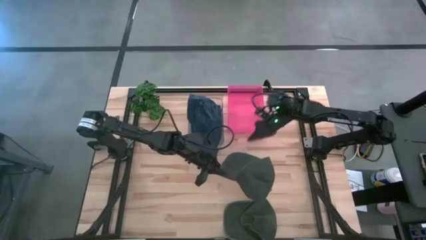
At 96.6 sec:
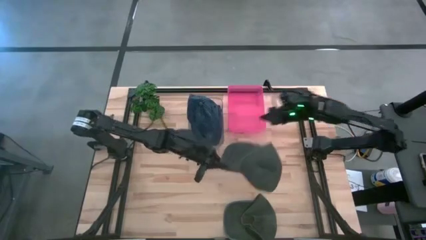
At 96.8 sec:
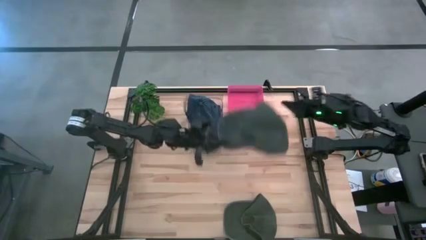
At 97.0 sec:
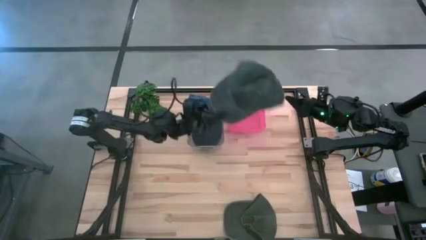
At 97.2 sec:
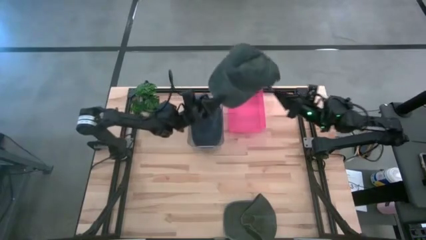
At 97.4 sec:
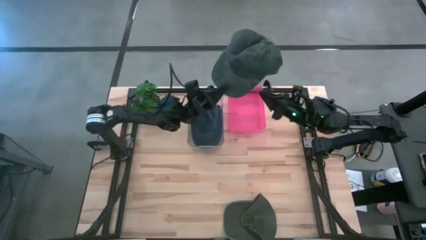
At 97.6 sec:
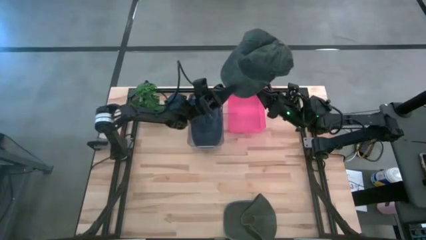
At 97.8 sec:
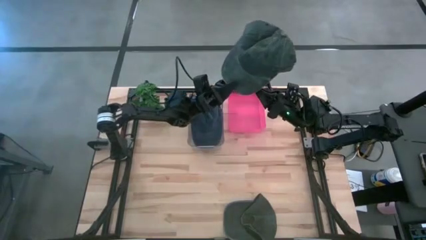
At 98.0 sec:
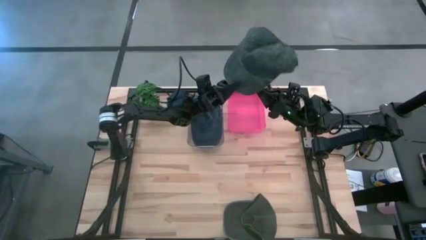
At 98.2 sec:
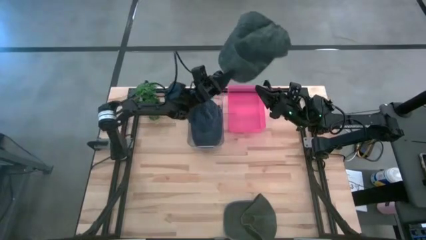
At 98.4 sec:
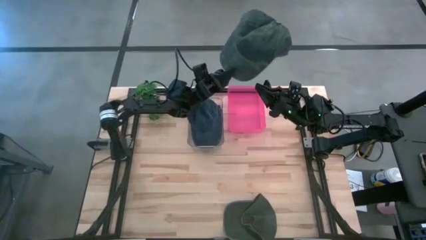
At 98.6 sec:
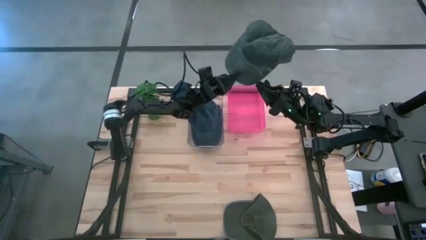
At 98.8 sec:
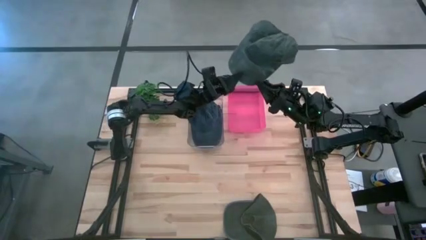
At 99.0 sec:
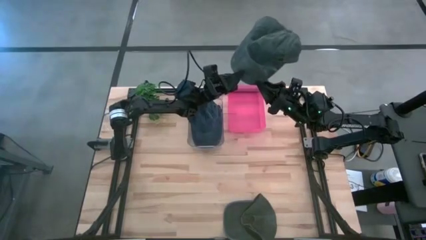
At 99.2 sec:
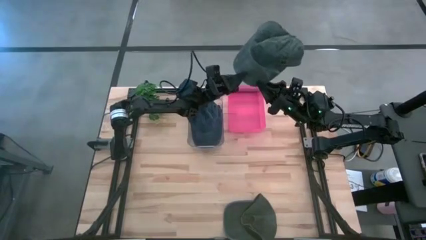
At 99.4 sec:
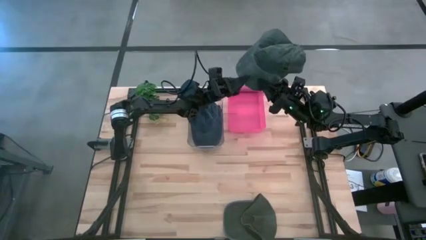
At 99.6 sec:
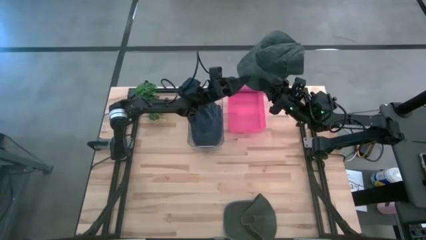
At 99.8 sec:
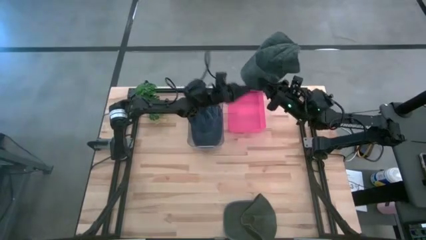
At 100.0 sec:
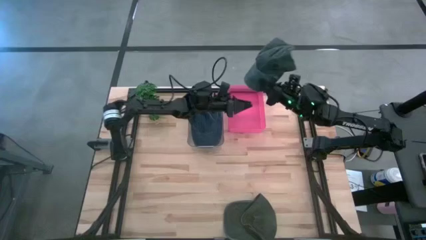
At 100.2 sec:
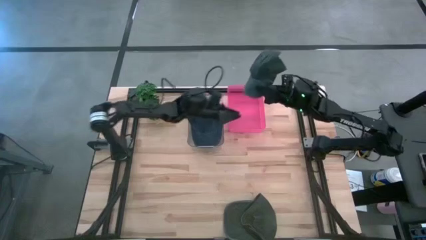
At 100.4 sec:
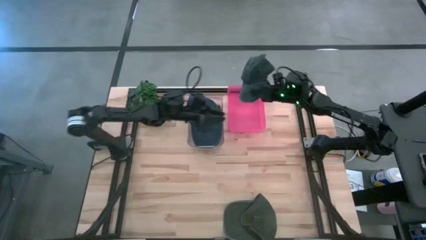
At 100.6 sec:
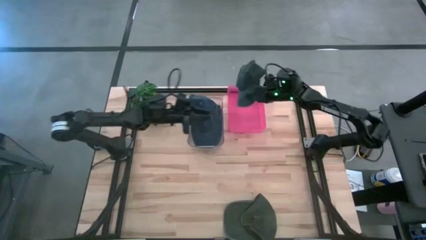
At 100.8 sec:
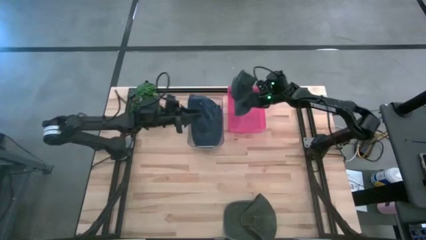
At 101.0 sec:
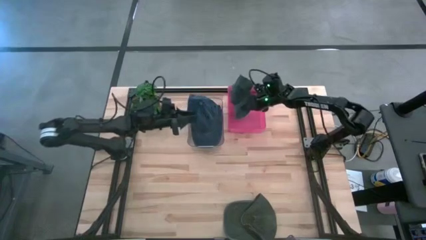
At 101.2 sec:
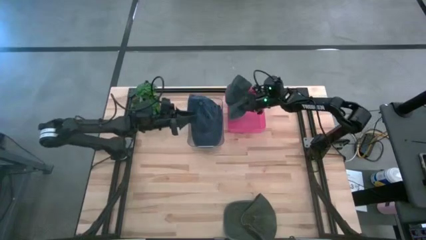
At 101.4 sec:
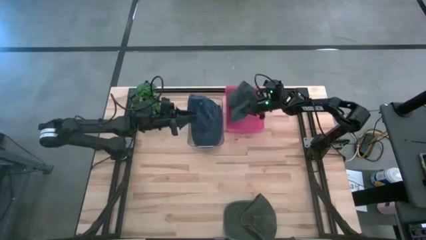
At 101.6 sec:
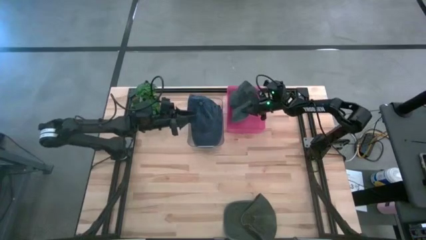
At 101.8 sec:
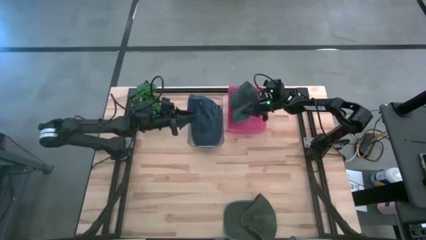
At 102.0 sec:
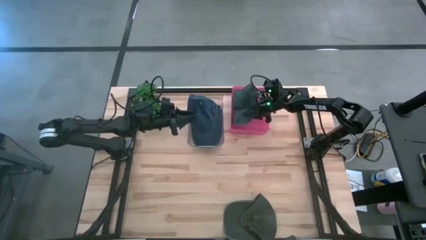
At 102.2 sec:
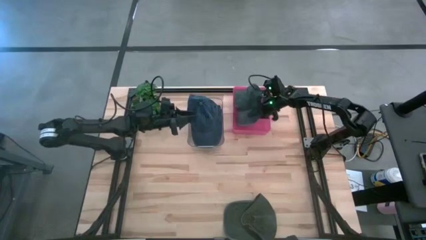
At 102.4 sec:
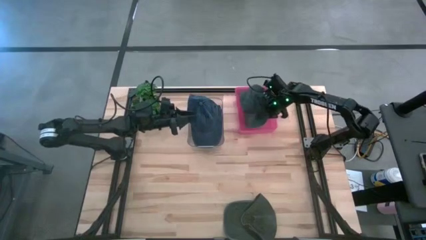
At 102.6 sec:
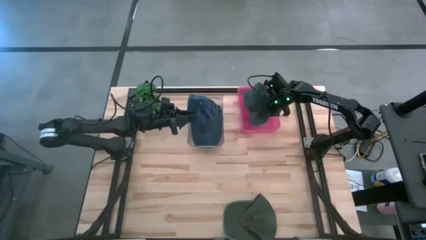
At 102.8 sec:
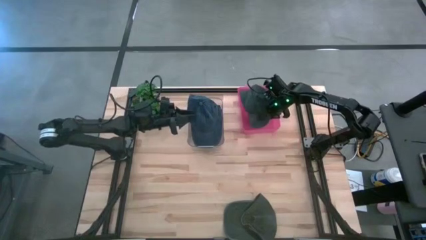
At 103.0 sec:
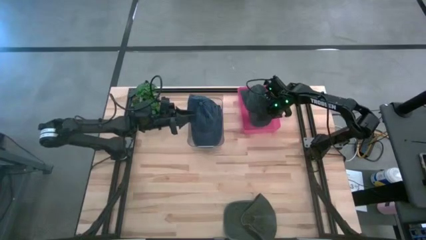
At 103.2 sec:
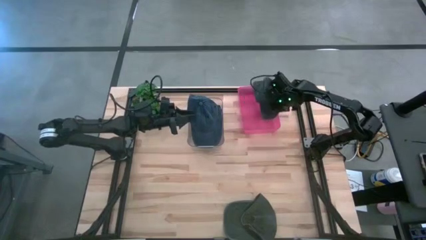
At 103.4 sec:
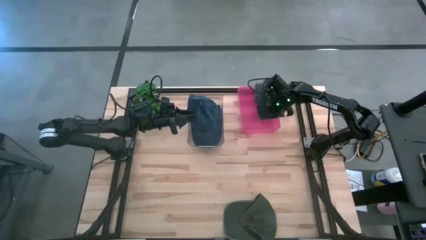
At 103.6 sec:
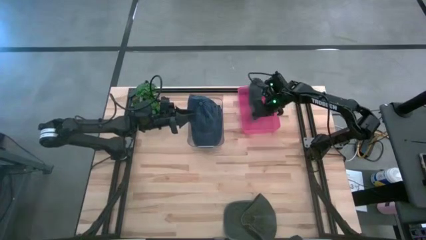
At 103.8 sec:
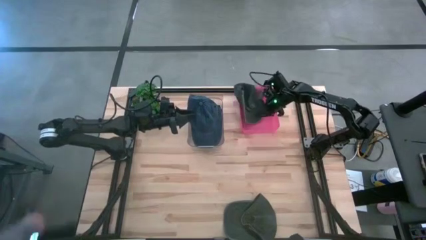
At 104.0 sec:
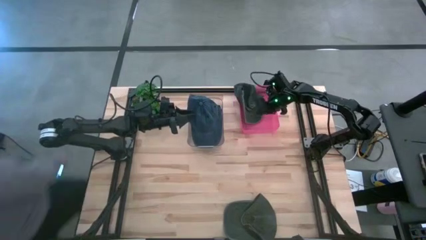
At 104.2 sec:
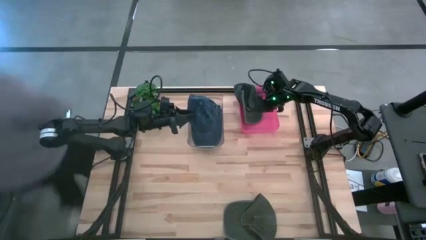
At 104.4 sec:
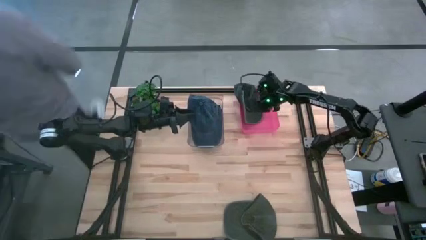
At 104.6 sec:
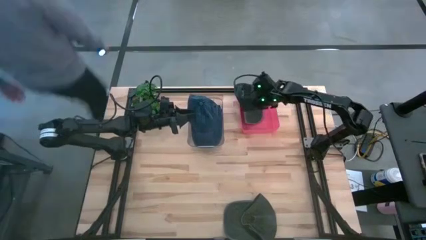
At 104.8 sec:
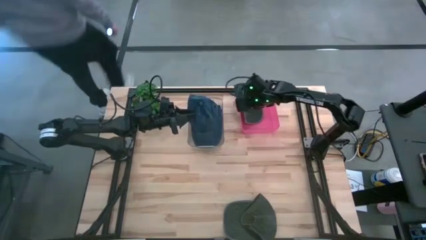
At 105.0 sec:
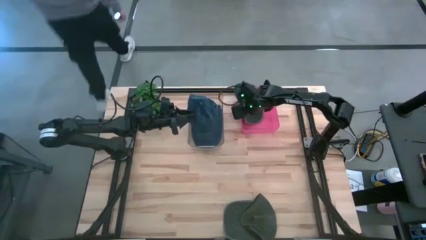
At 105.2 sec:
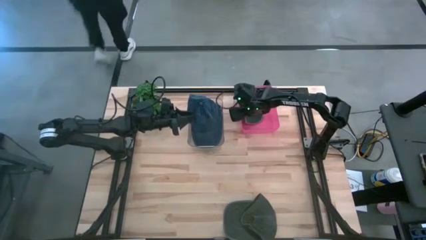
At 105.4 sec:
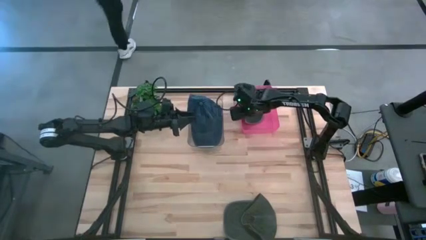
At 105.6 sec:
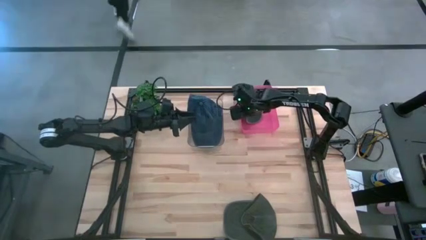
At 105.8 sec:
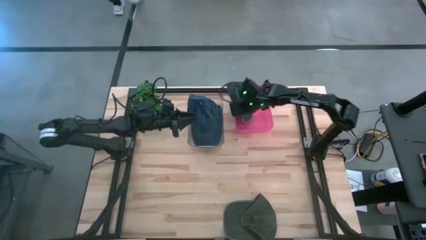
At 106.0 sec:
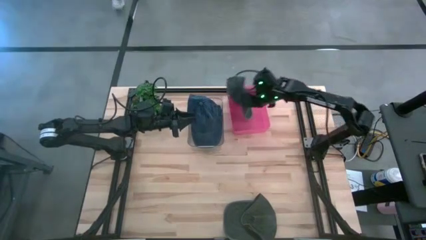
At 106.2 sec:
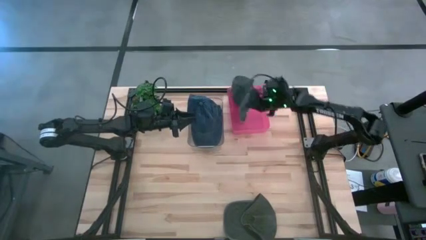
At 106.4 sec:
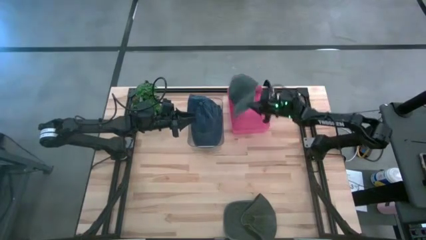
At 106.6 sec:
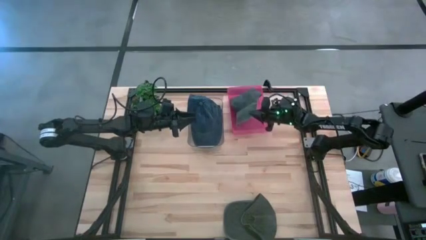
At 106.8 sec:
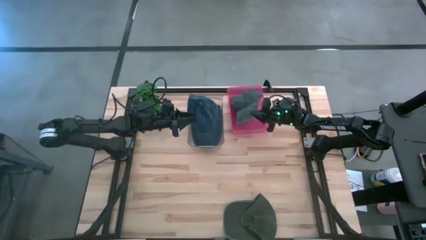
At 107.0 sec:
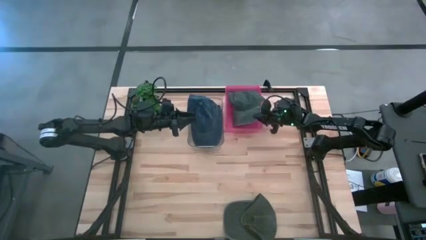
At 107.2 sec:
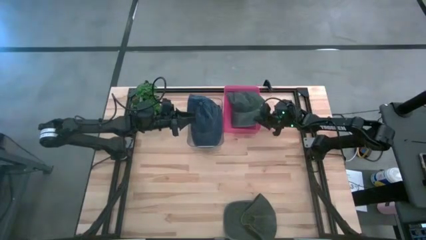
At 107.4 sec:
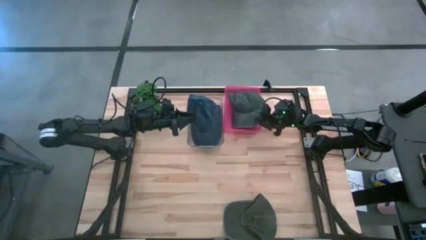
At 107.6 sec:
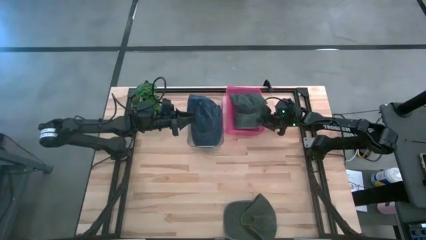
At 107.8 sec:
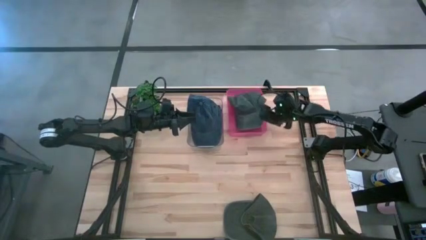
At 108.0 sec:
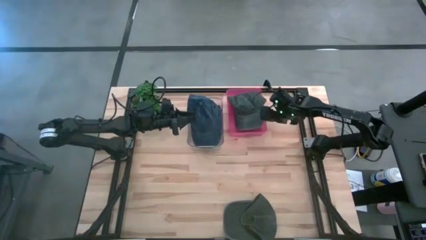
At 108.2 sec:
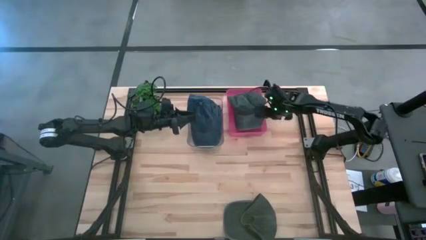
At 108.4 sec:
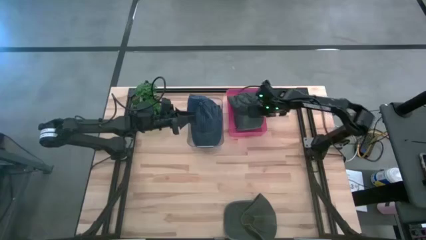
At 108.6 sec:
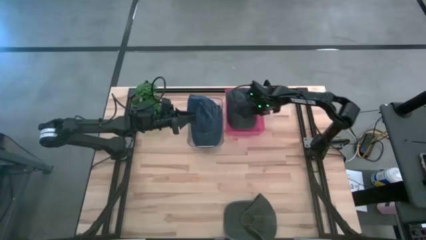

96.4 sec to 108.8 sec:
Task: Pick & Place hat
Put the left green cap into the red bin
